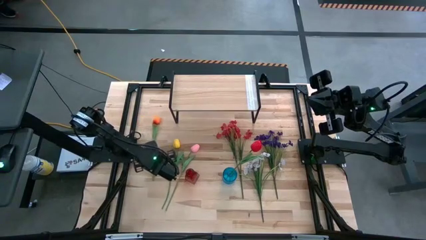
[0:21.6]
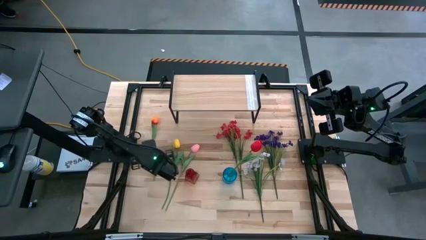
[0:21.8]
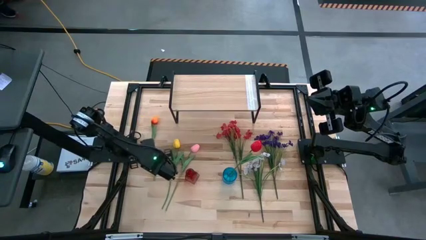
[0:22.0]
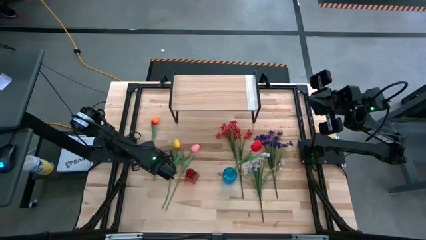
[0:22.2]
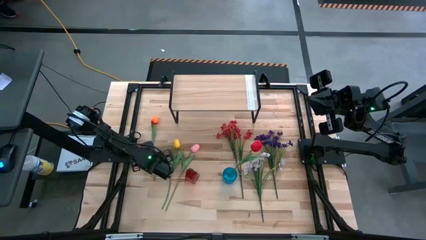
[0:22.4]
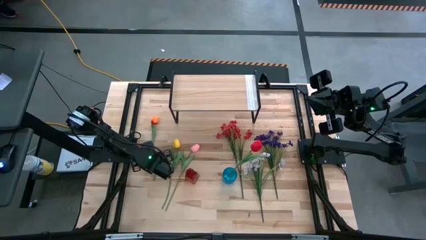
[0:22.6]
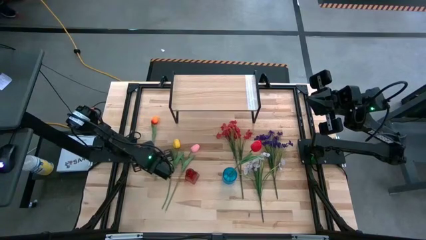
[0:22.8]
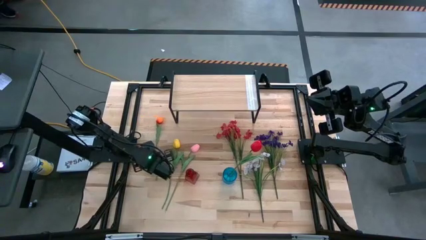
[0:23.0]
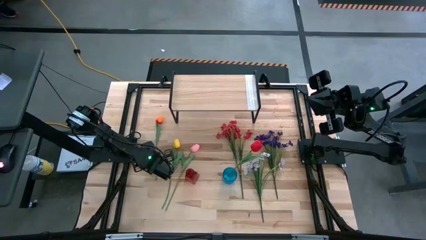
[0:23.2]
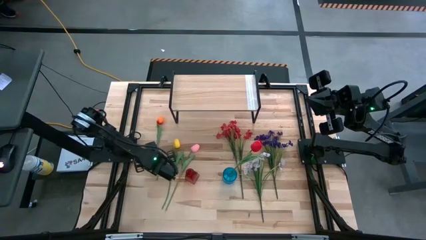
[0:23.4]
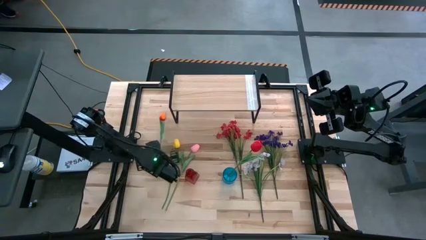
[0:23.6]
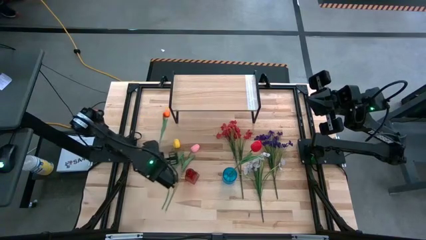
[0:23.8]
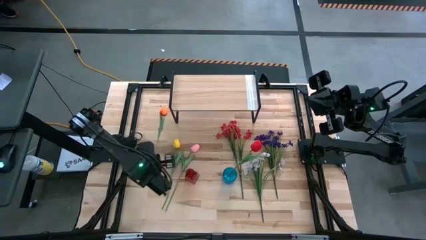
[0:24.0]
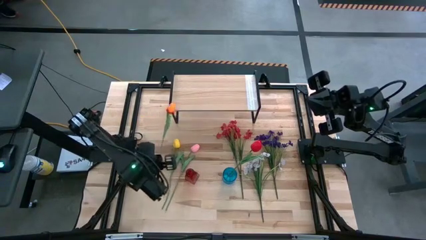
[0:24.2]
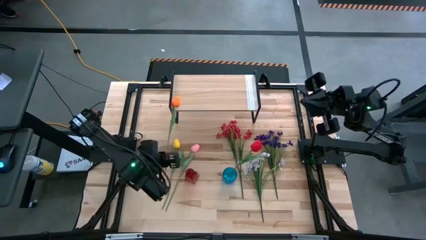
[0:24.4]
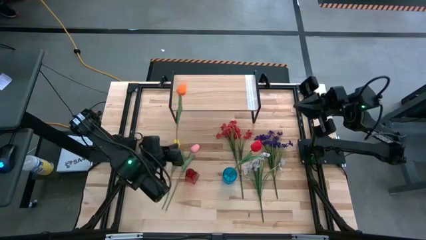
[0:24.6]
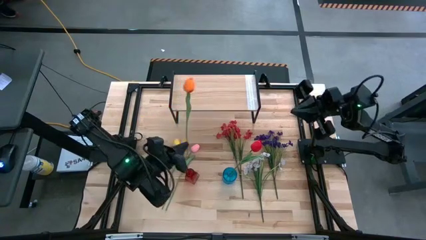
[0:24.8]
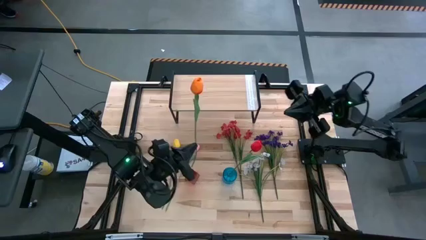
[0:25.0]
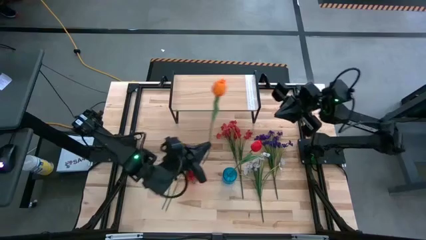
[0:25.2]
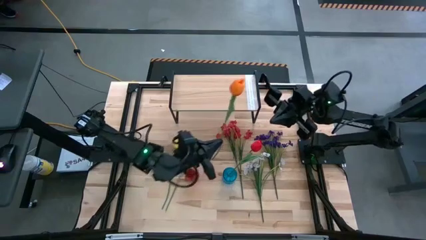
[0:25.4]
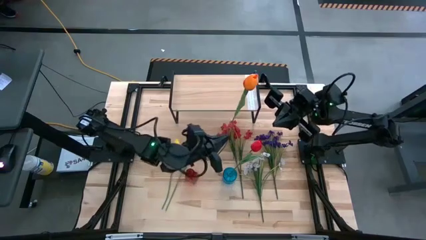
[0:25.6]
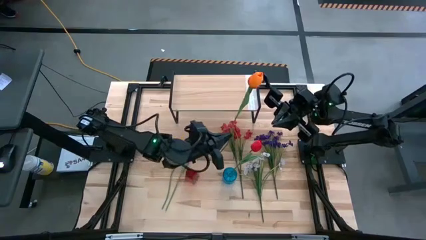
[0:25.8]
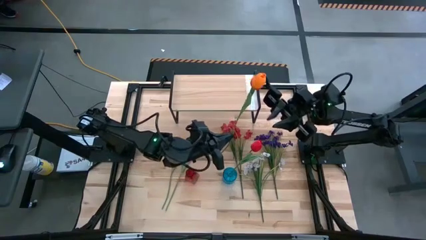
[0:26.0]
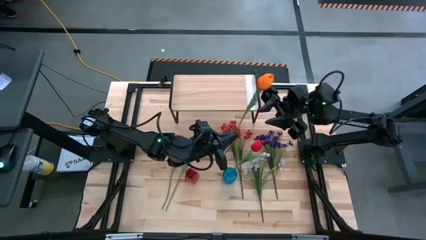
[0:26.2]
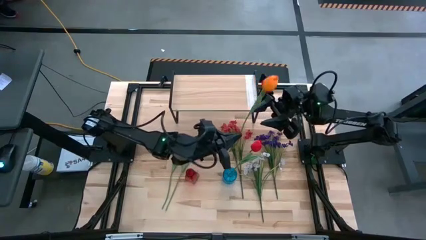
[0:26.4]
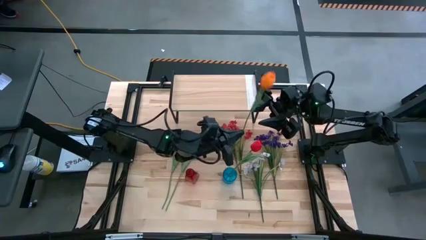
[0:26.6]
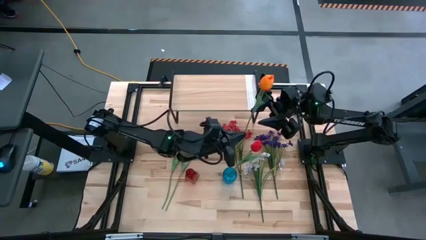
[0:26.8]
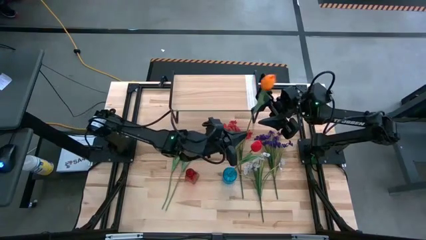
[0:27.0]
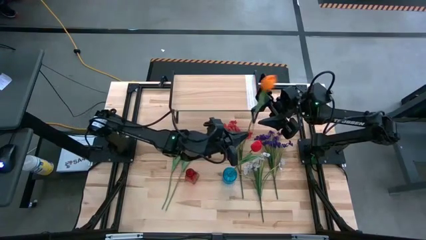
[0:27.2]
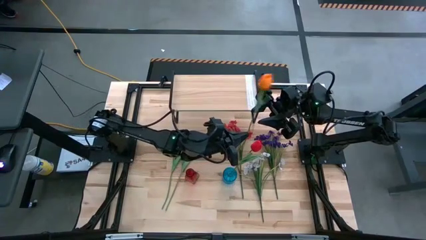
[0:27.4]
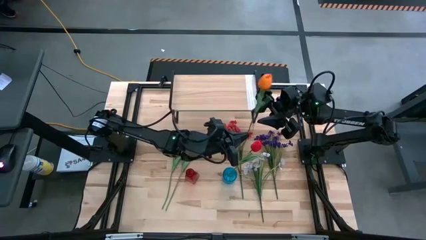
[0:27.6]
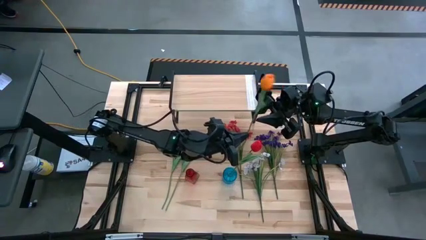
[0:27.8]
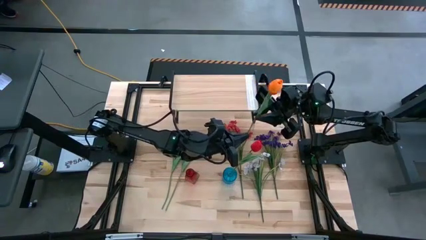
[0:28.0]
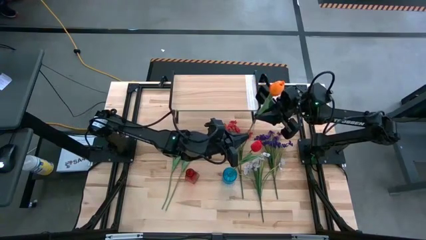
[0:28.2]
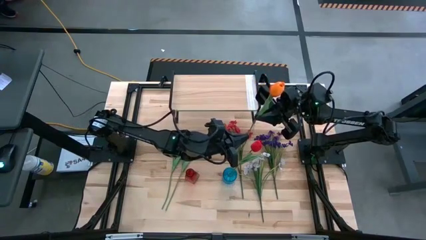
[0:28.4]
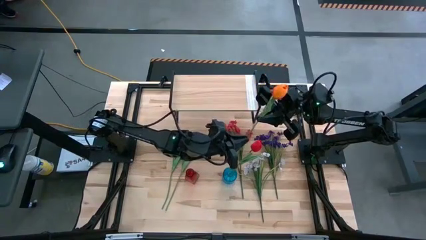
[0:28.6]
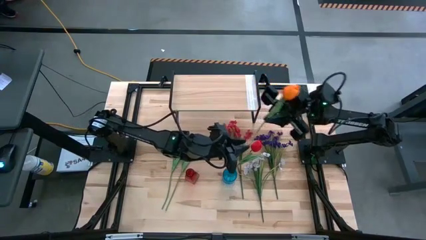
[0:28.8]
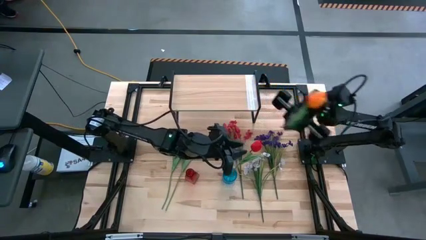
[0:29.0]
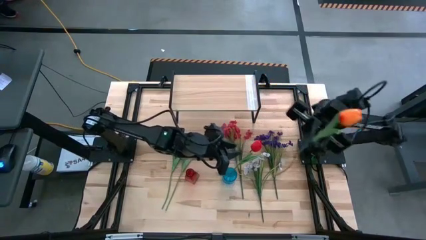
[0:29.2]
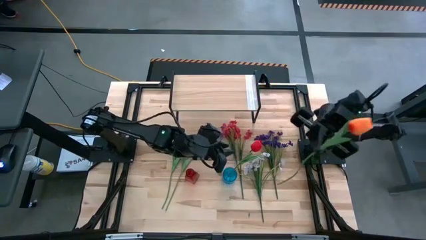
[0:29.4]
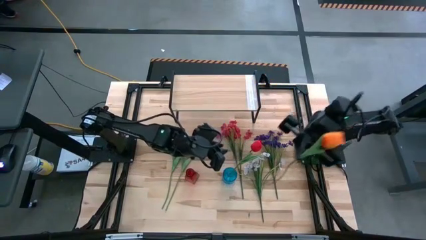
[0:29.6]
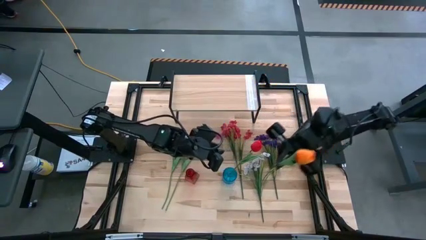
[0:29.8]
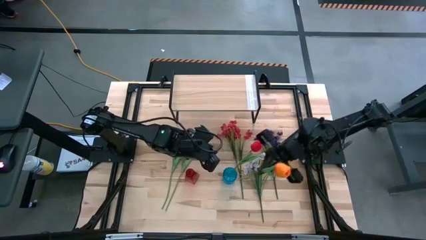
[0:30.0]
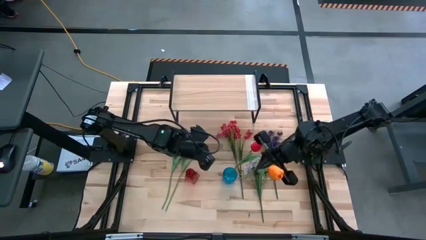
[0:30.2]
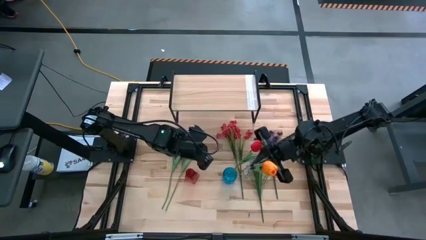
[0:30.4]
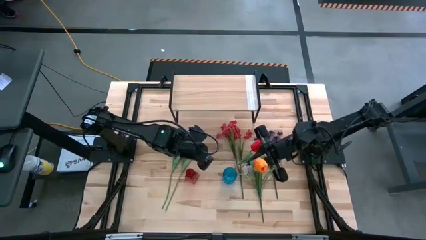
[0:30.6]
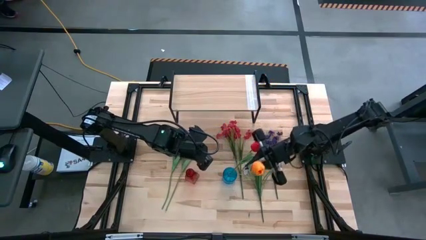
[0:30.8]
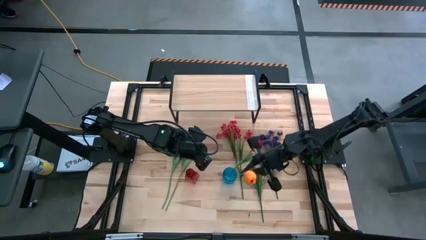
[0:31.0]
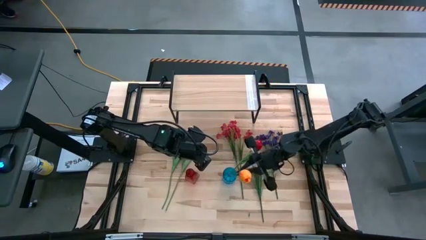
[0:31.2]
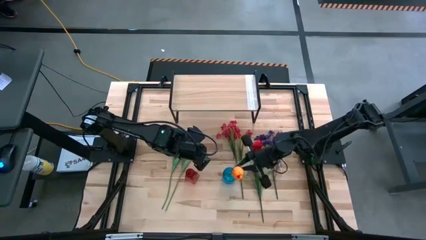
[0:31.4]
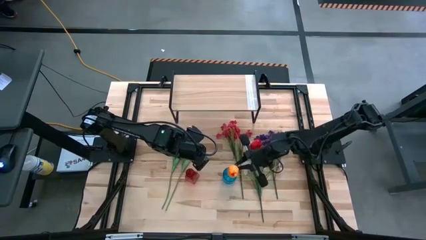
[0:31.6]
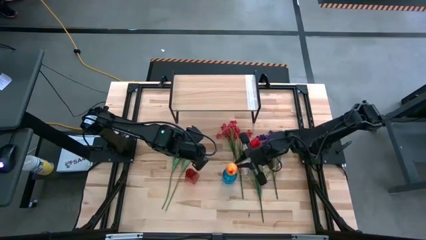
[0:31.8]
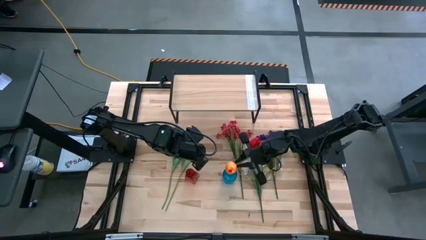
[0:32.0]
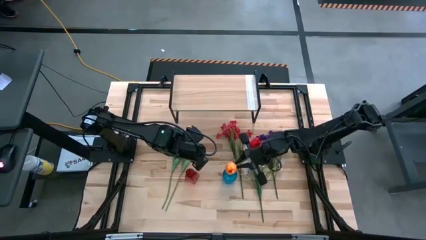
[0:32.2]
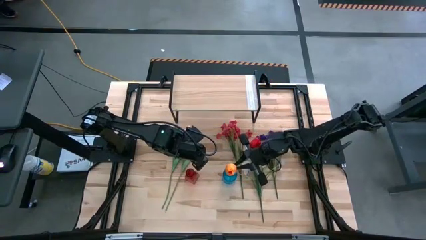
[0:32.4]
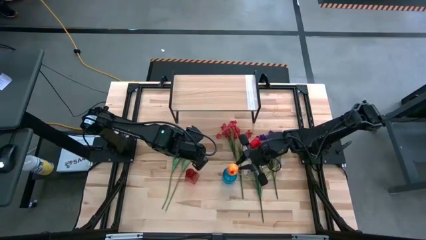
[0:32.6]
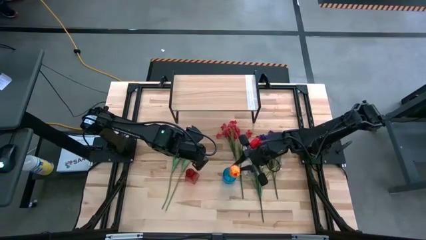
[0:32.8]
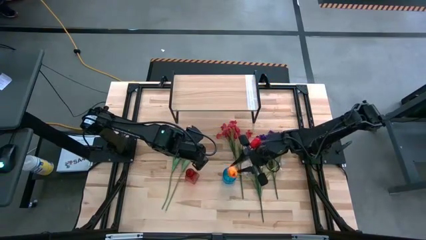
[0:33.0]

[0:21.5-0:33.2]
Task: Pick and place flowers into a vace then onto a shelf
Put the orange flower into the blue vase
